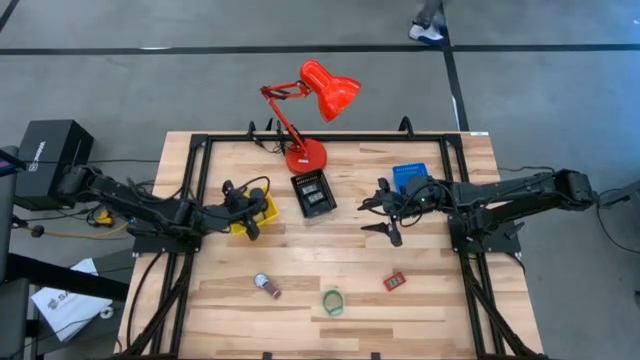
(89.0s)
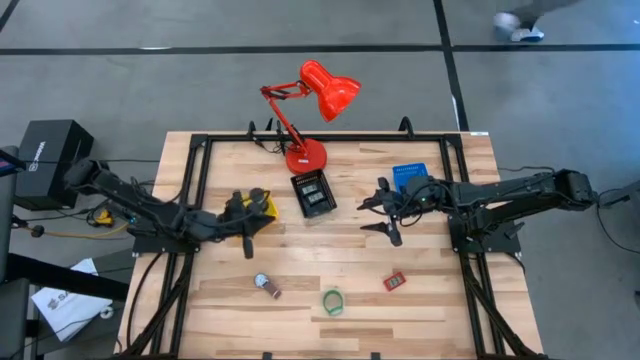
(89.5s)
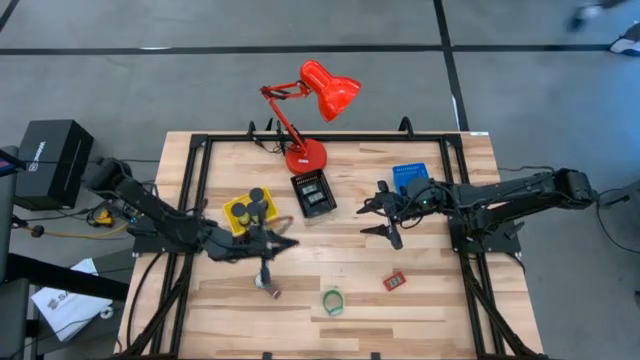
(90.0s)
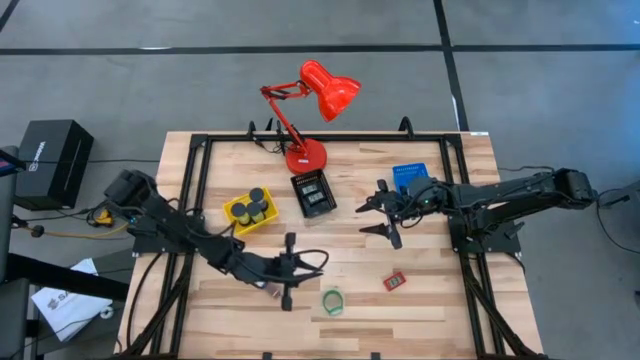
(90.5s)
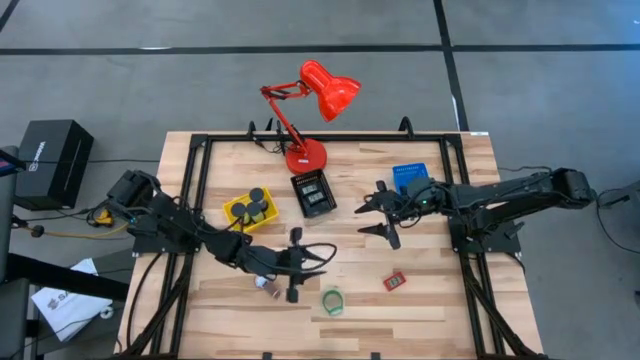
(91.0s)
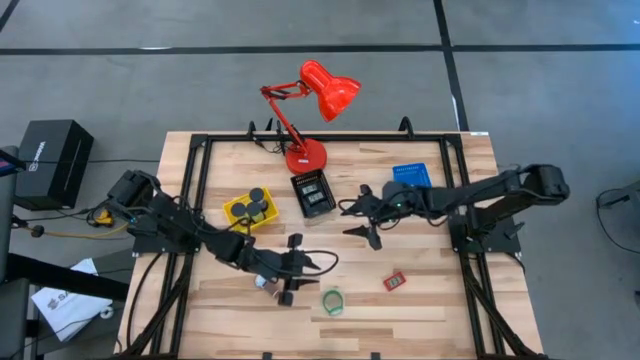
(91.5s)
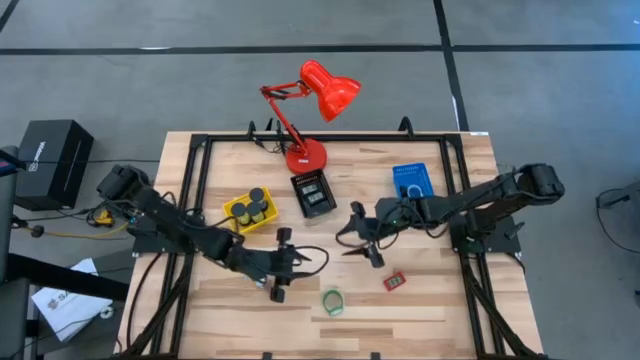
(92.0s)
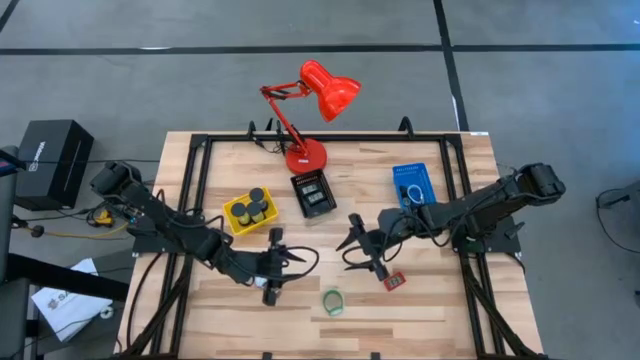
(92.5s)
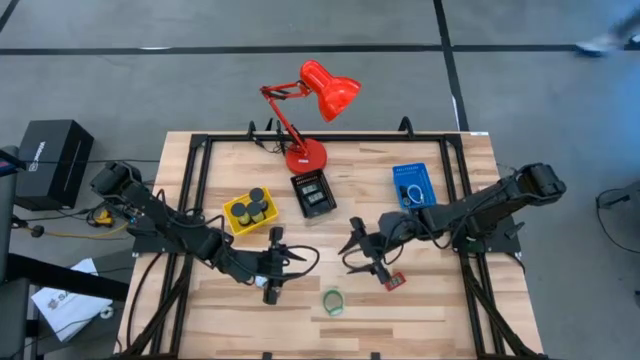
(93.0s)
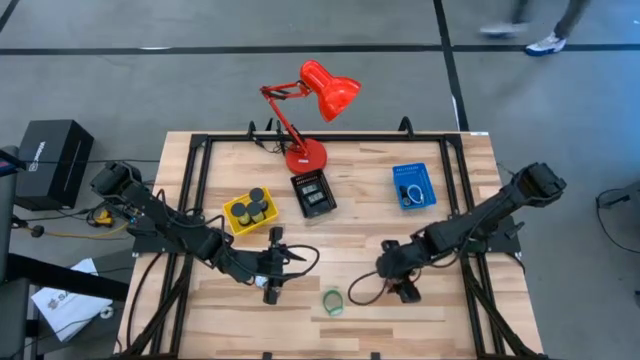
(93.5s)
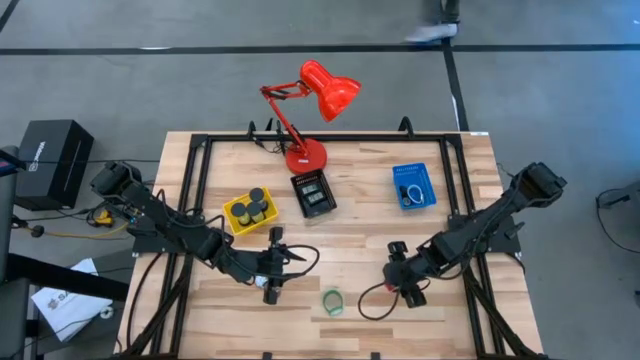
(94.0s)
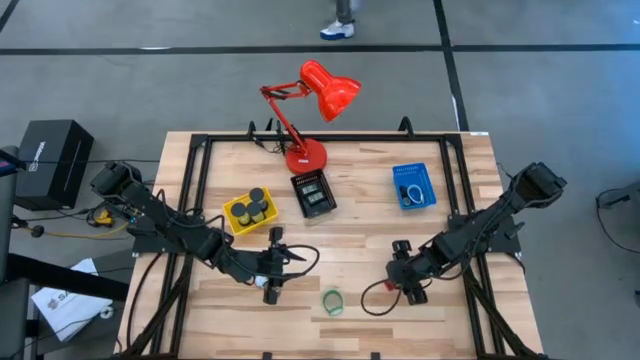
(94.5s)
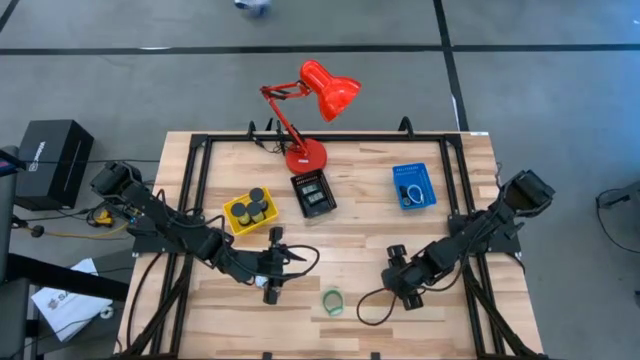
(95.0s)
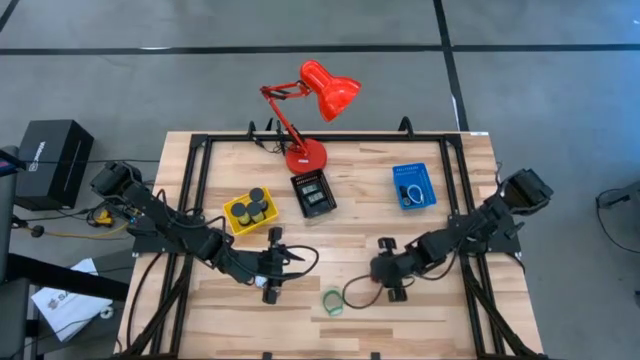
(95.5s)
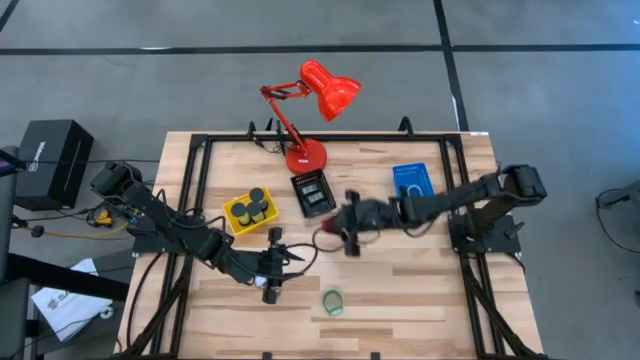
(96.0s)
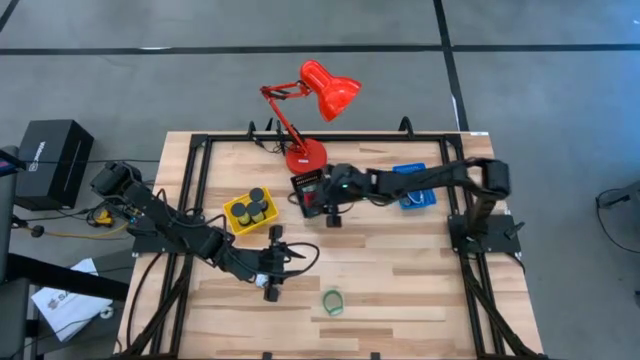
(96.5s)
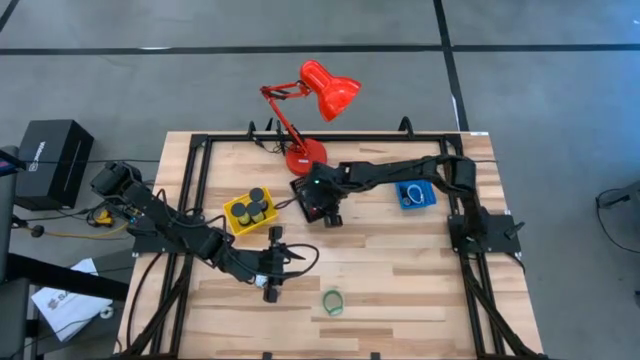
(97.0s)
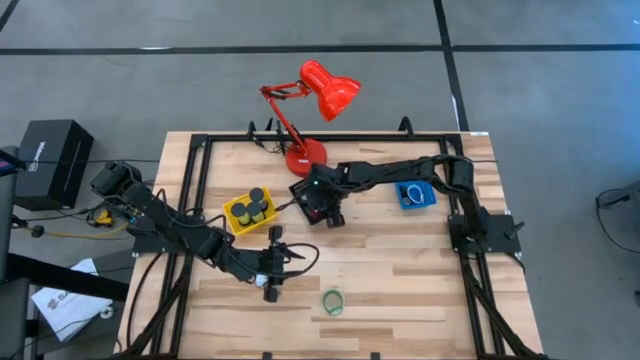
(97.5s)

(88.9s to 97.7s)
Task: Pick & Place Office items
Put the red digital clock into the black bin

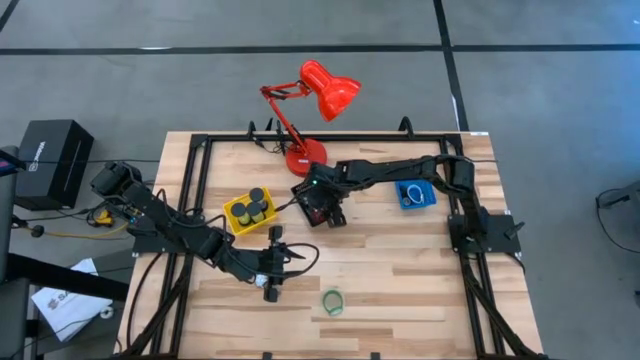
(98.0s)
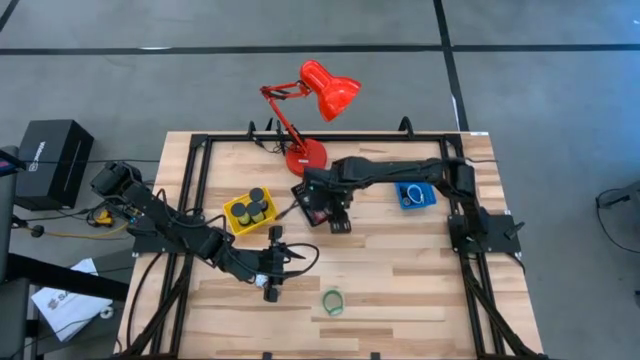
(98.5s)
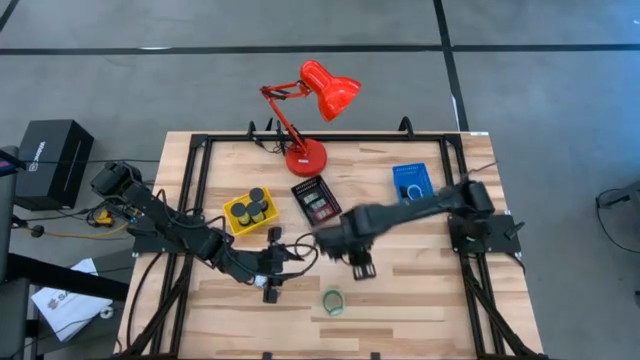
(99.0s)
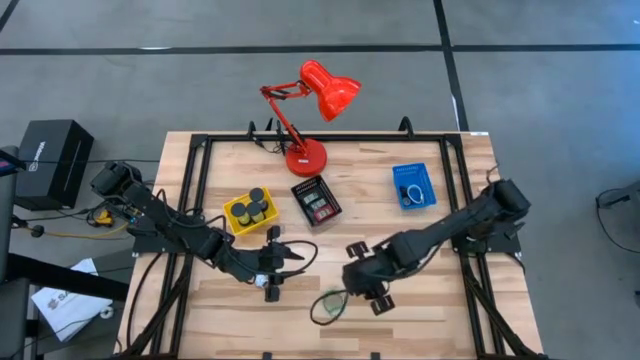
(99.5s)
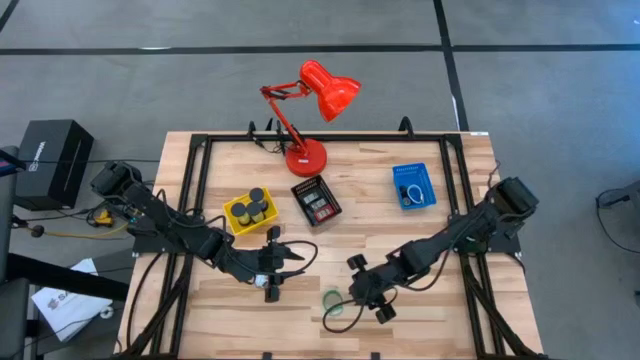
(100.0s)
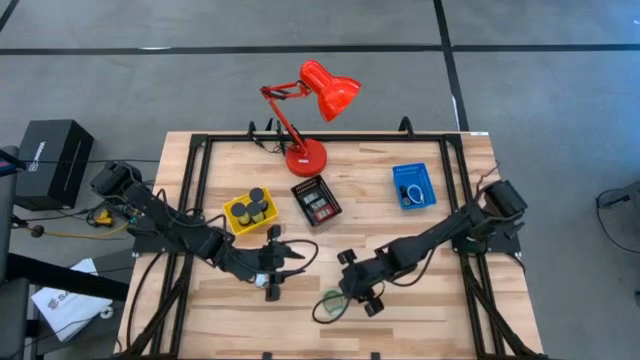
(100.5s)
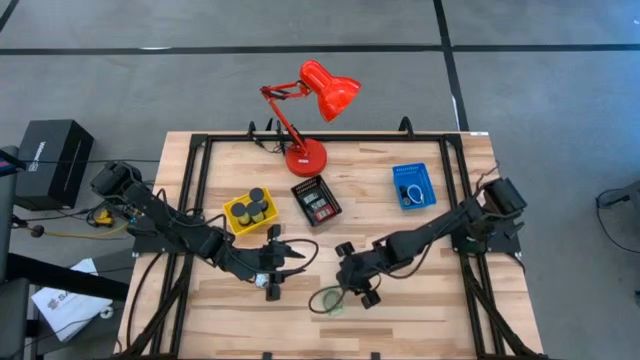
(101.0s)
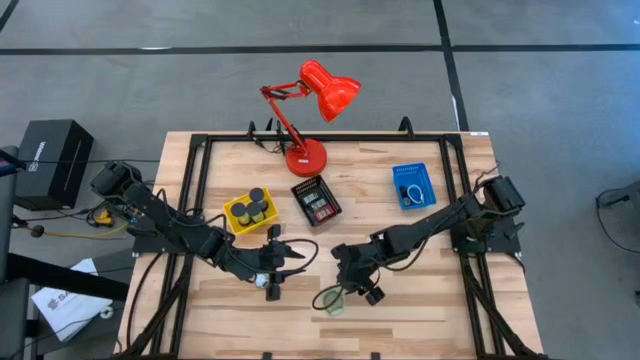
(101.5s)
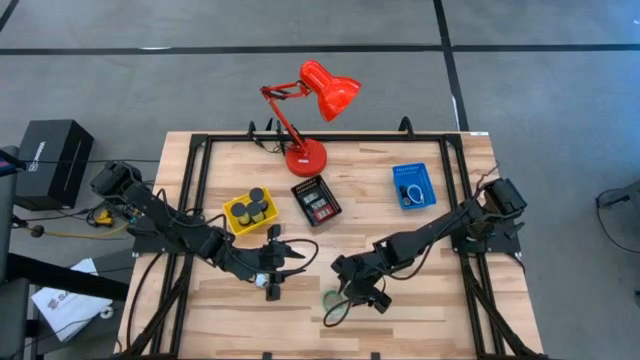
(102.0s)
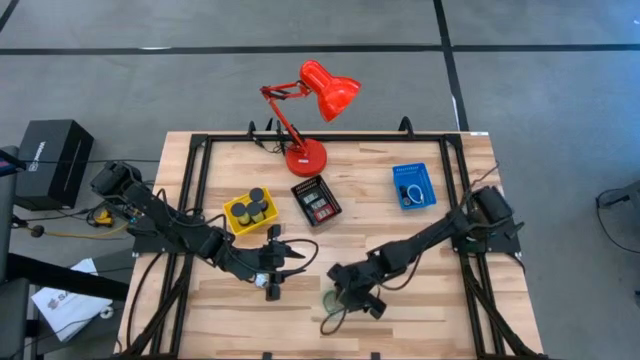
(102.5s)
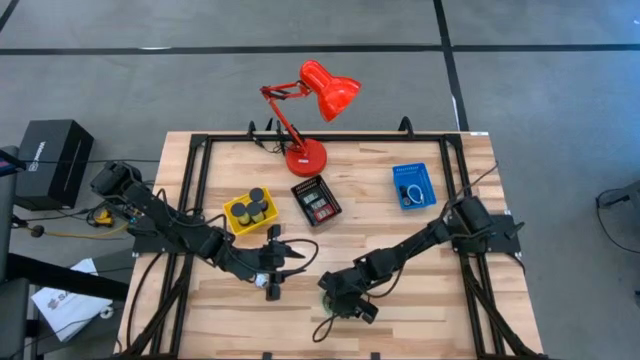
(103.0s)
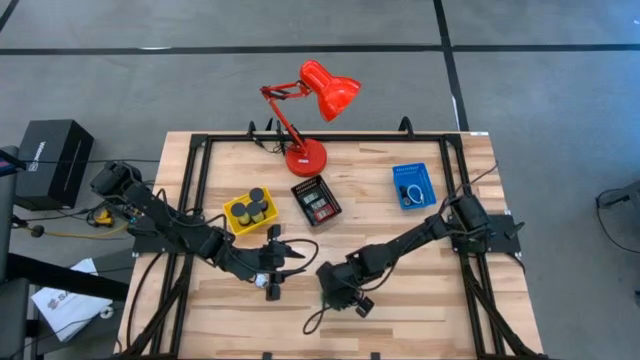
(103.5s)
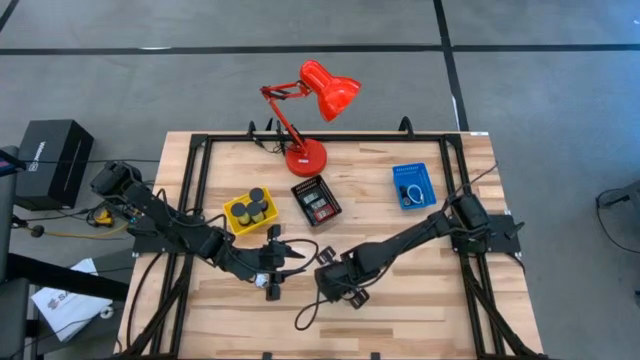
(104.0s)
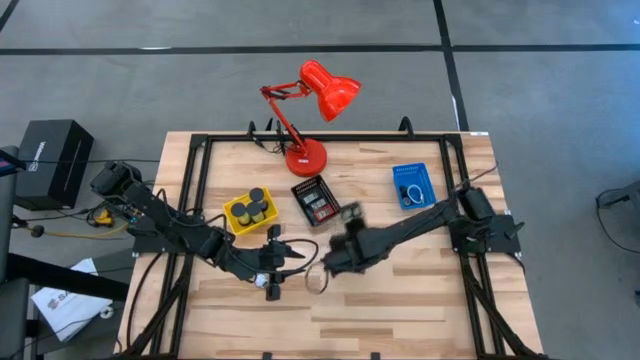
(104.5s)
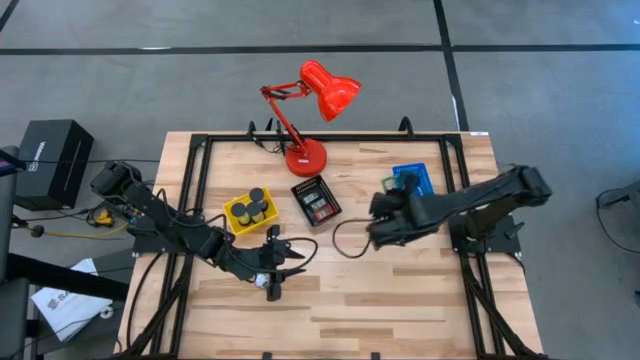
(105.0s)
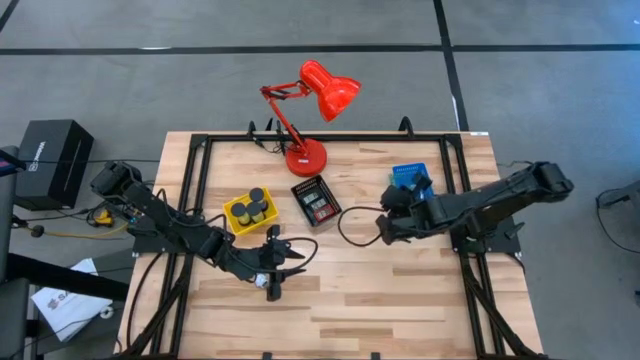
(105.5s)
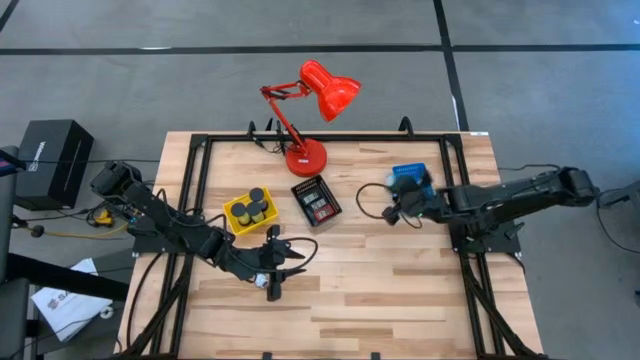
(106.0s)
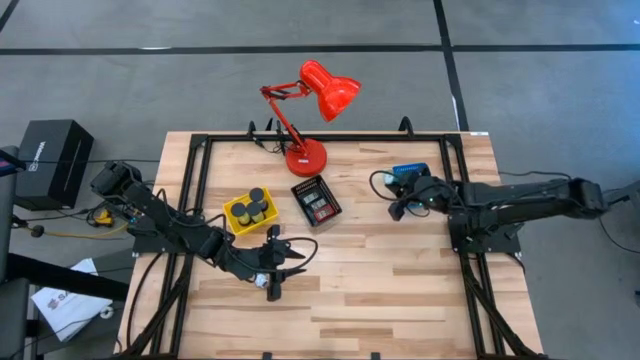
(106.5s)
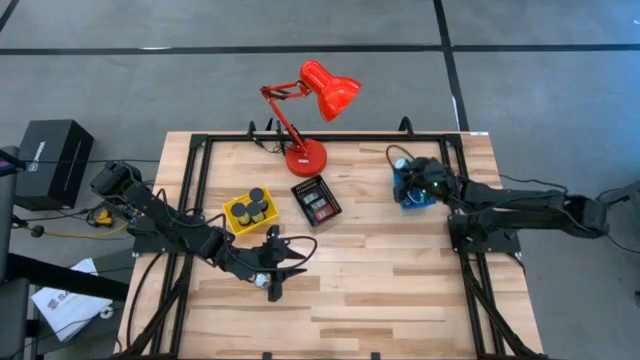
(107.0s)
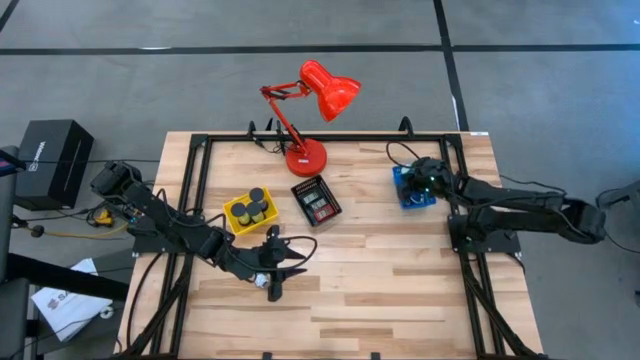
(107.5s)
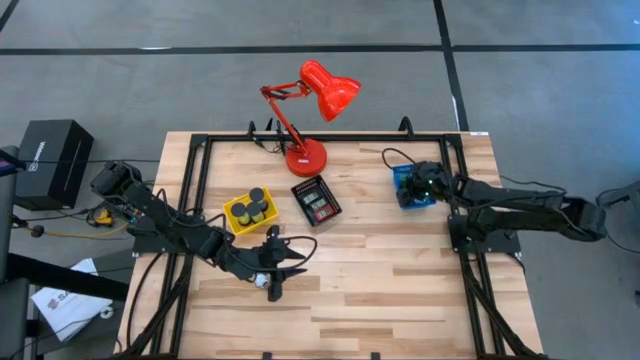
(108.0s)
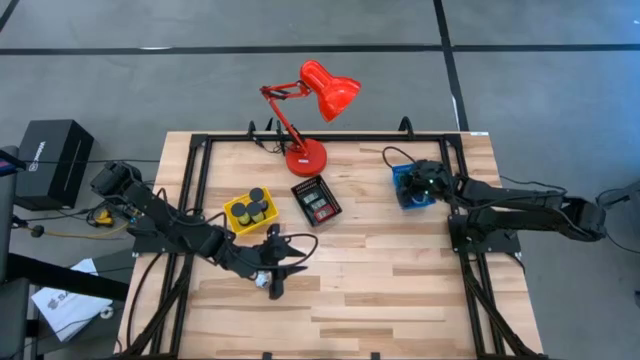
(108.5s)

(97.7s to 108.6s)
Put the green wrist watch into the blue bin
